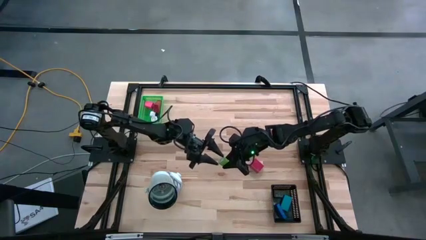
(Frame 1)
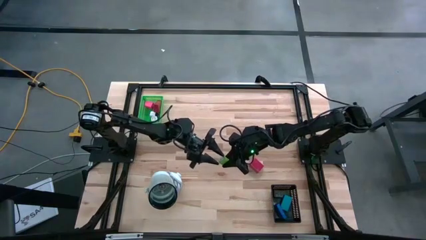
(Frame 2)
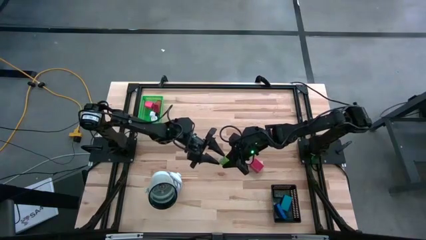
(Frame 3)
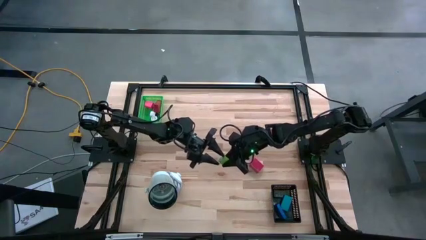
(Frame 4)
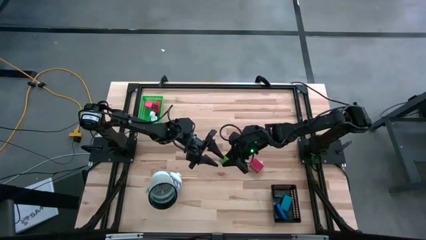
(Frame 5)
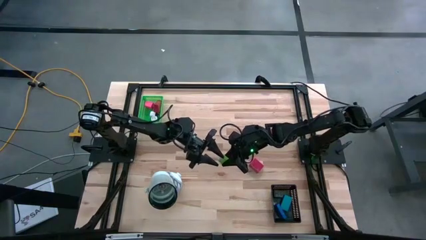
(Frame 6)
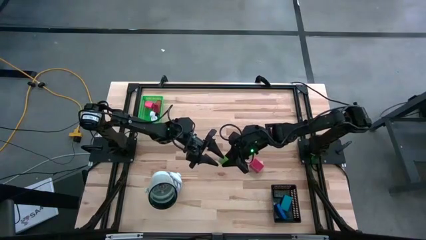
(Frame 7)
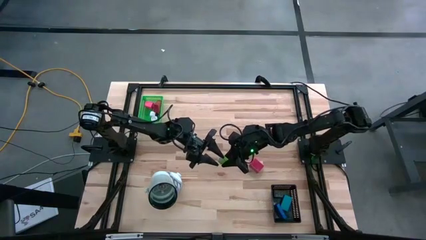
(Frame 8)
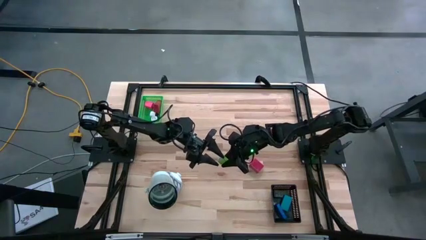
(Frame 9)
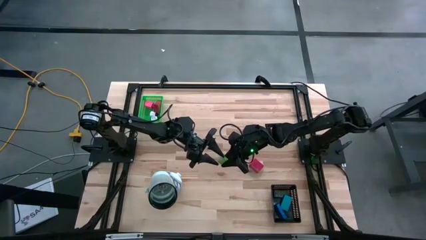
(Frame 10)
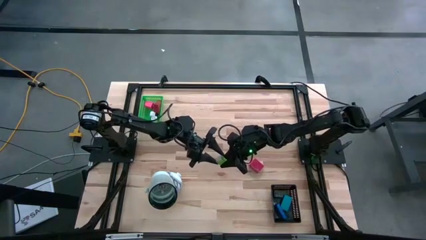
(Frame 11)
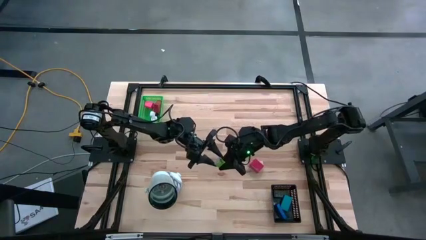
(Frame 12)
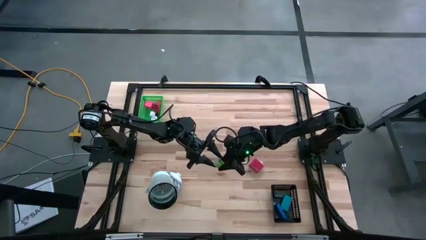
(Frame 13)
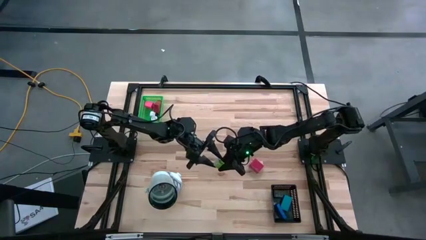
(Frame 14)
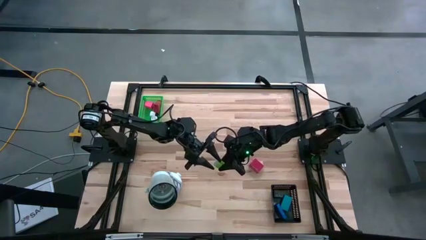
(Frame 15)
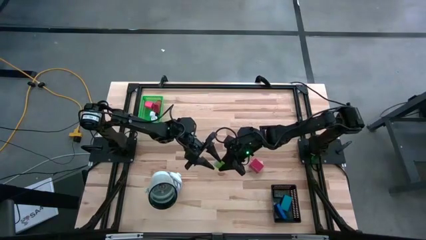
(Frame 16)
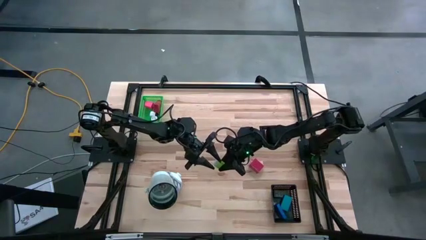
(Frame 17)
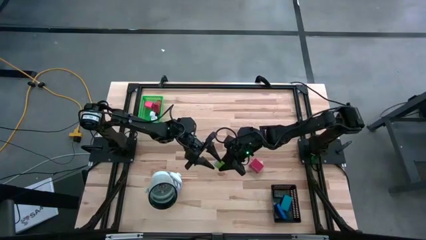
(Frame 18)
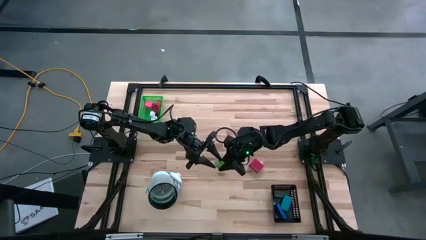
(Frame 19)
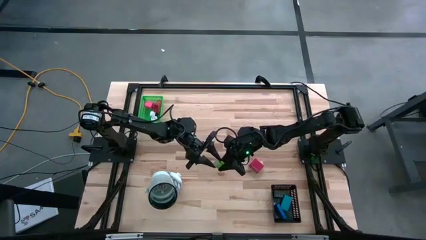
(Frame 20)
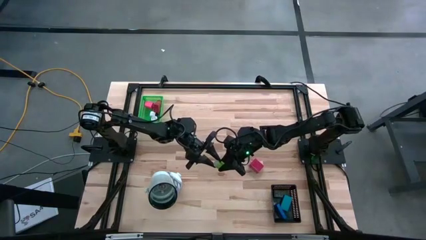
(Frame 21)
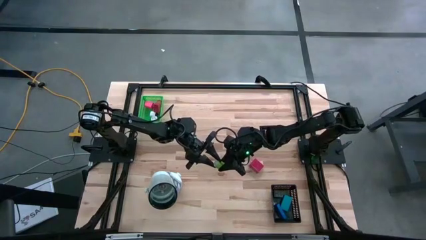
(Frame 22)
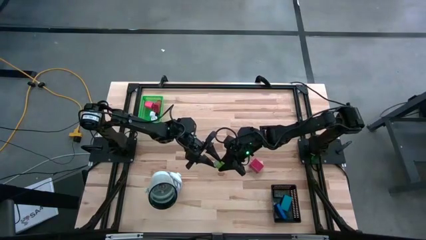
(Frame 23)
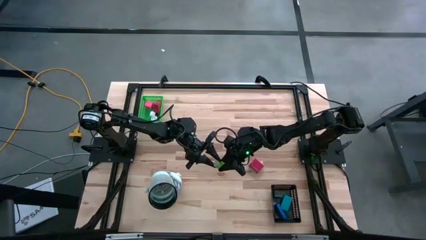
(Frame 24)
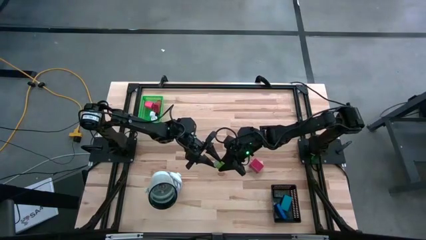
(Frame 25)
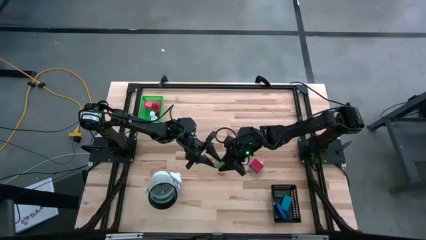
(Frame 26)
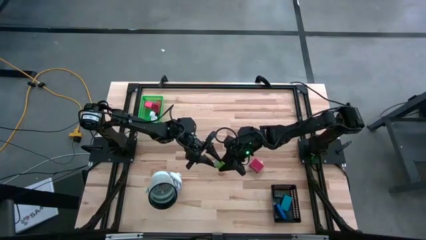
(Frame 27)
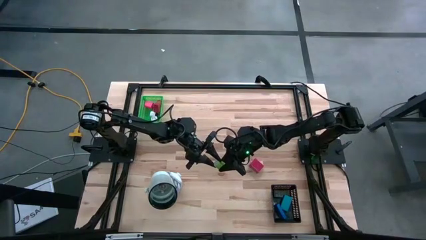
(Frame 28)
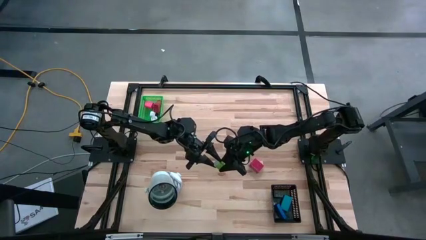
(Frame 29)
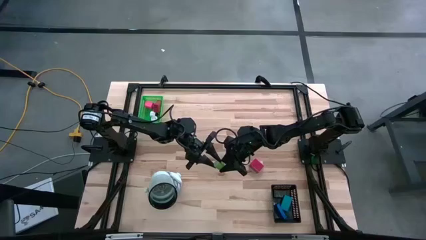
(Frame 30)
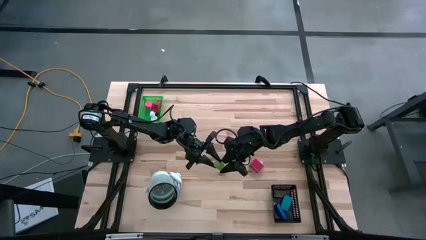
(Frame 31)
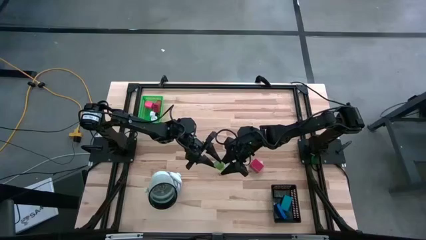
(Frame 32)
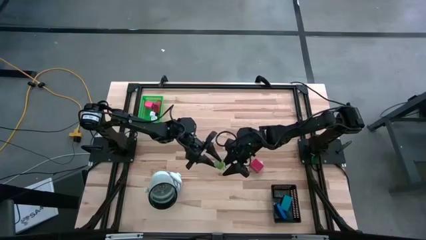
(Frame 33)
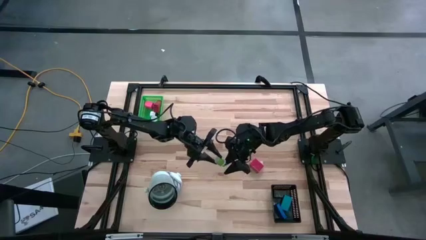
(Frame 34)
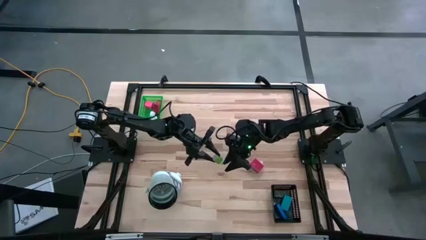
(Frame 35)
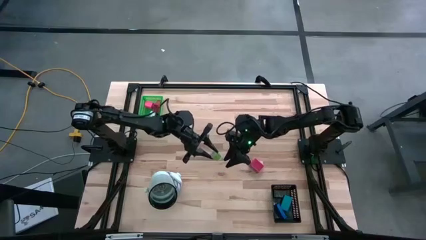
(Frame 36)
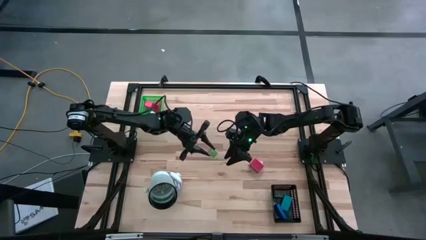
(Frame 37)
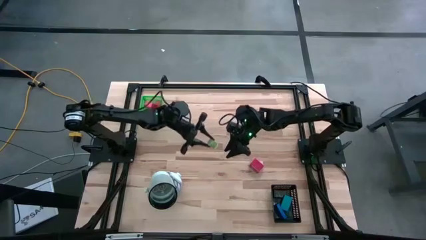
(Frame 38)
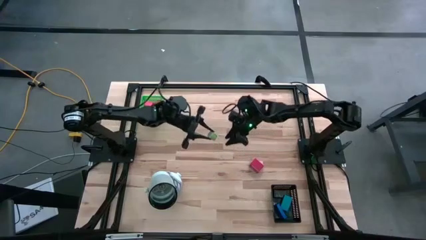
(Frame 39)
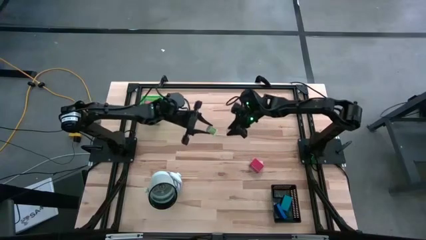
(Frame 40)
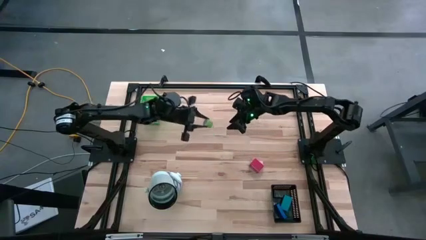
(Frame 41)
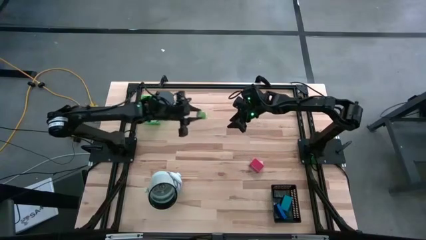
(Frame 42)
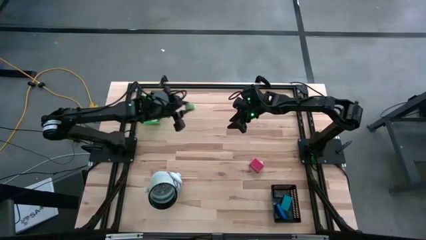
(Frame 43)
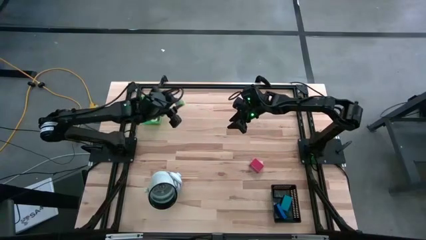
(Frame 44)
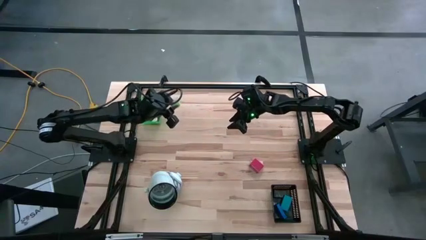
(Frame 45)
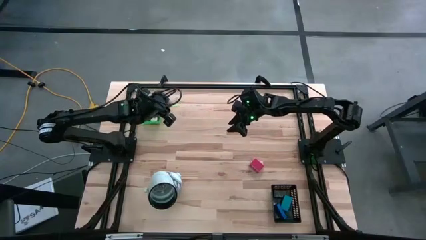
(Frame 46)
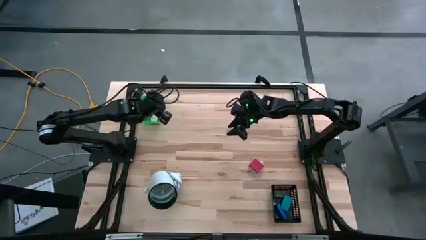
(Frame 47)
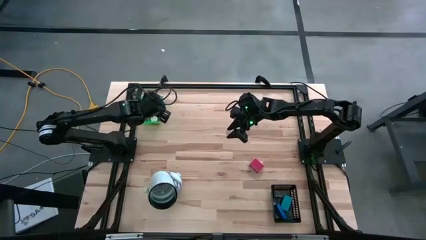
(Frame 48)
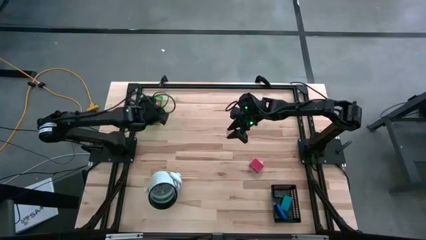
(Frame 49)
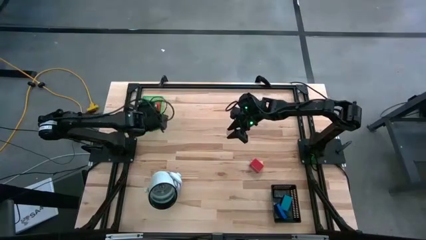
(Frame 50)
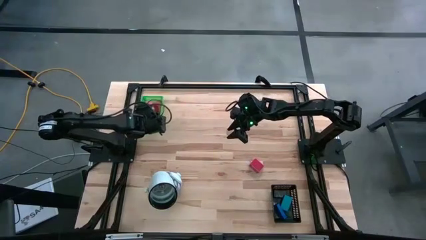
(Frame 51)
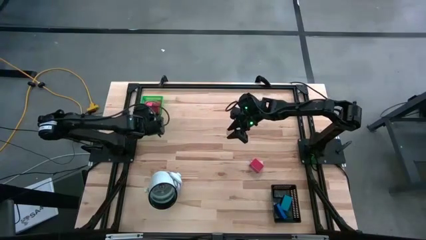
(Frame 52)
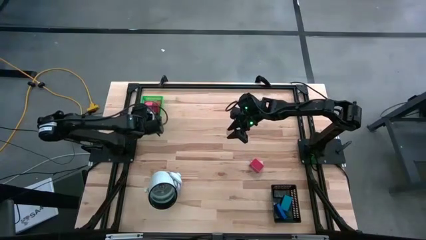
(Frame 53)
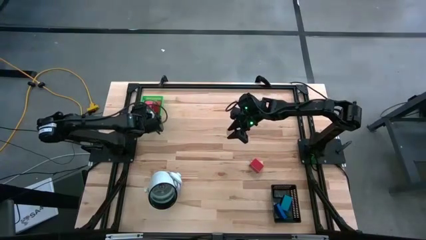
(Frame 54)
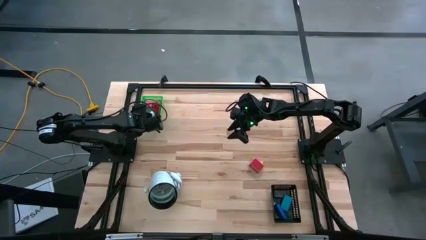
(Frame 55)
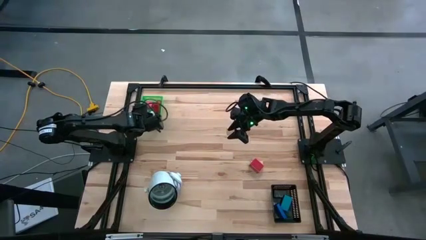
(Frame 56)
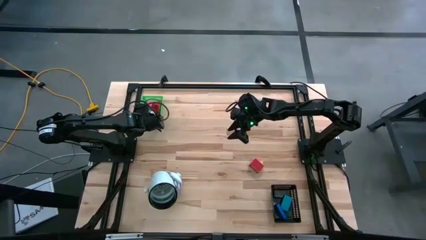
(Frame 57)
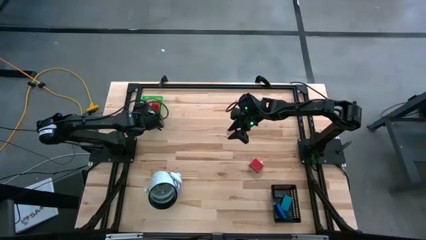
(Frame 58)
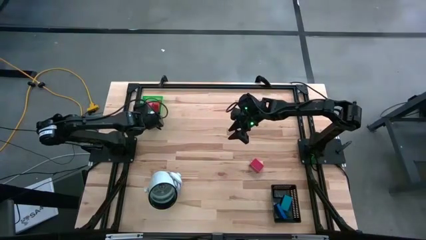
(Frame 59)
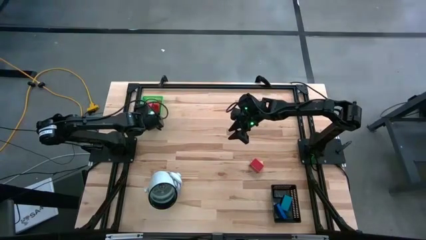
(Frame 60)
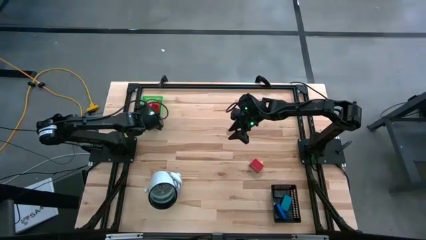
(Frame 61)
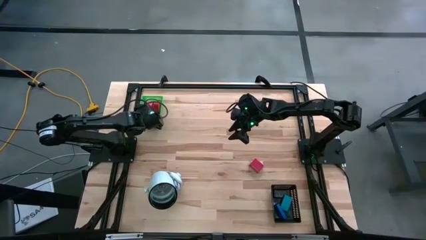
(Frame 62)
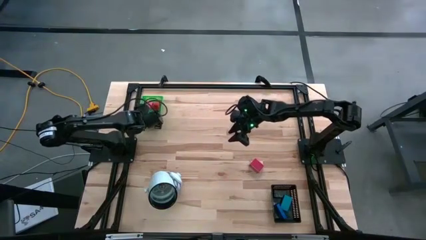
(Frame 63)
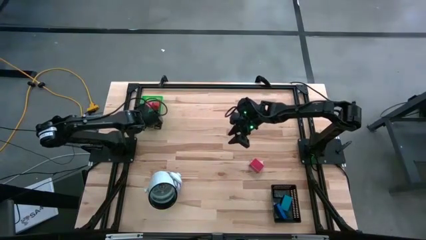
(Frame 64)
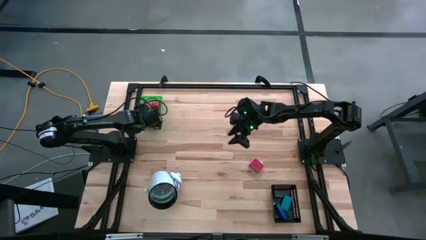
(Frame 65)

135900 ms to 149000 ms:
Task: Pick & Place Office items
Put the green charger adapter into the green bin
